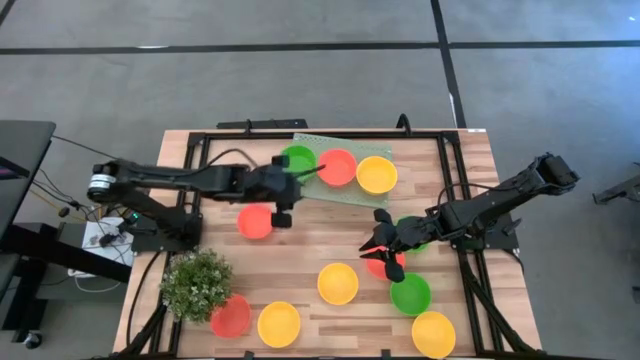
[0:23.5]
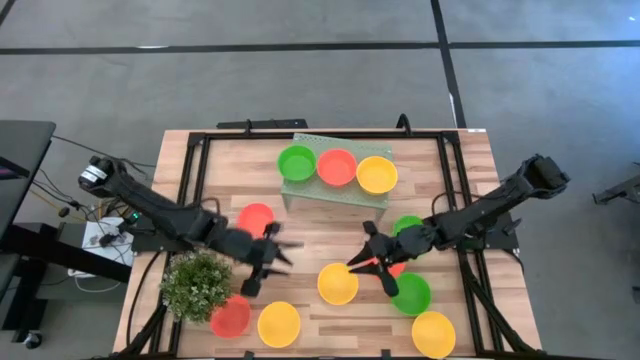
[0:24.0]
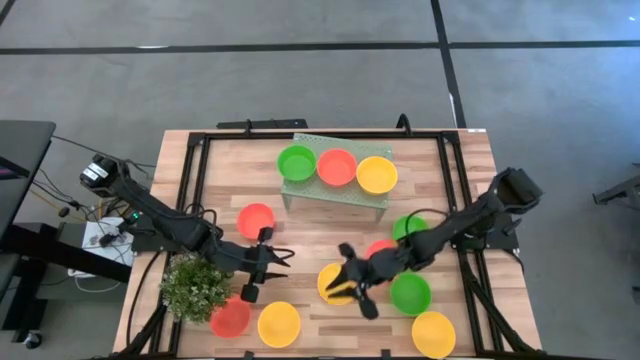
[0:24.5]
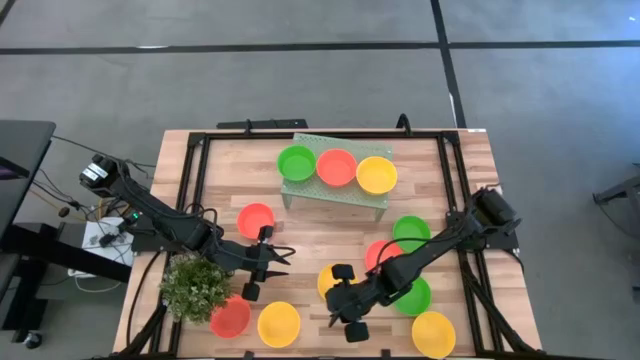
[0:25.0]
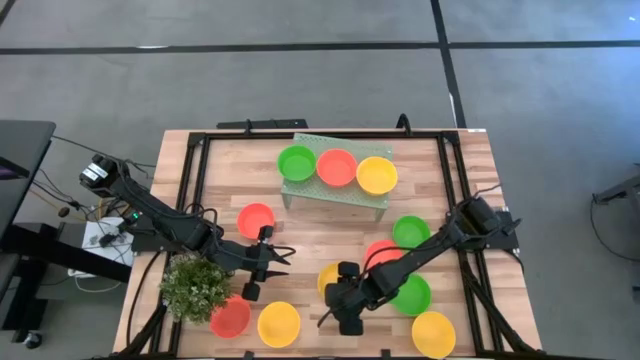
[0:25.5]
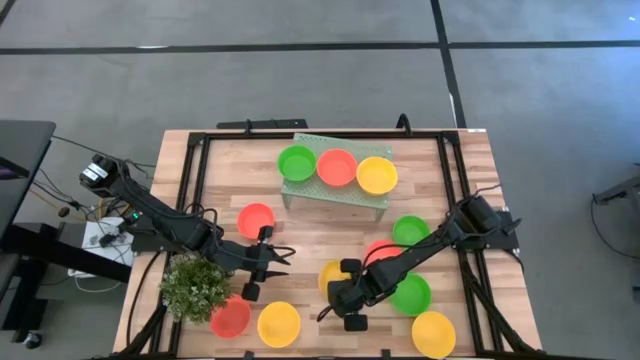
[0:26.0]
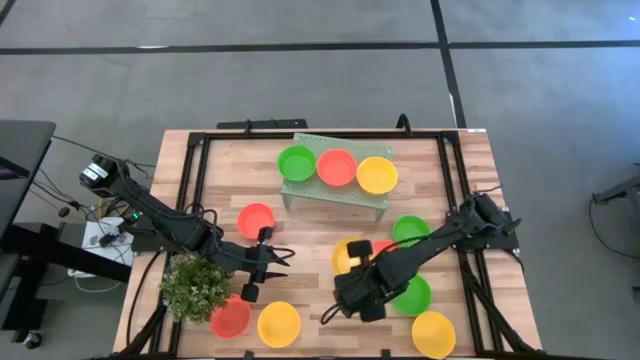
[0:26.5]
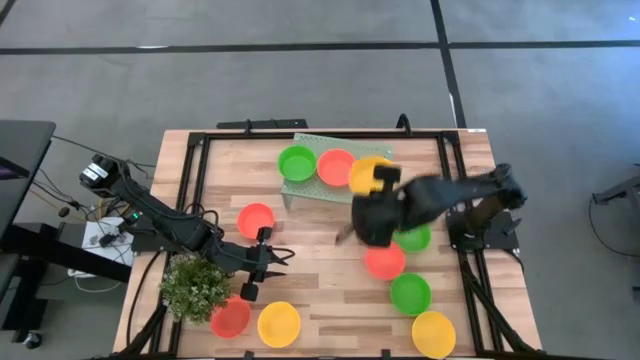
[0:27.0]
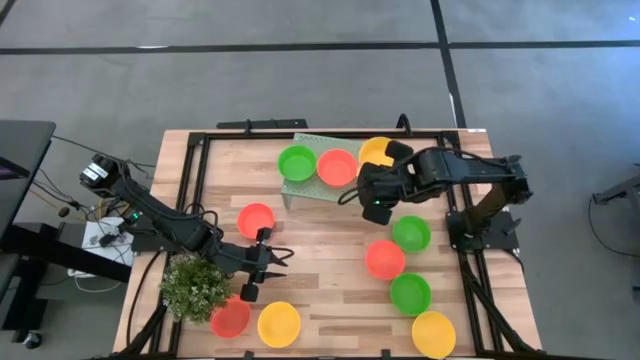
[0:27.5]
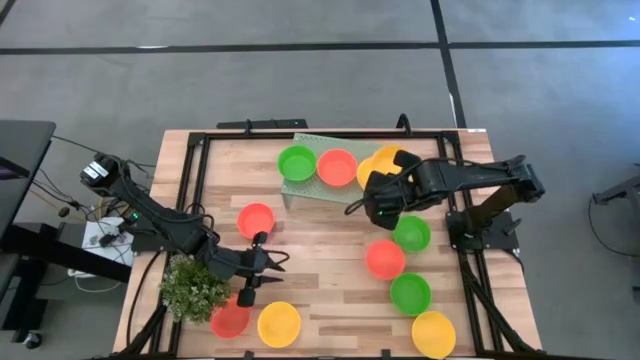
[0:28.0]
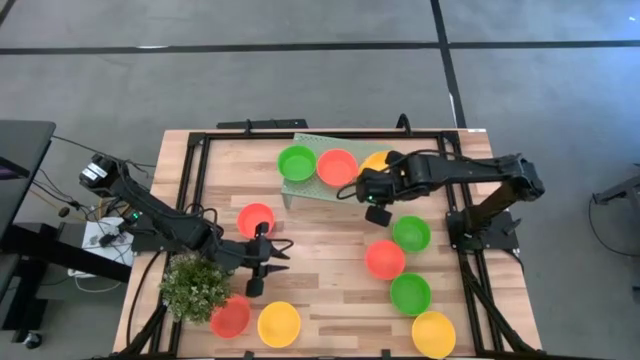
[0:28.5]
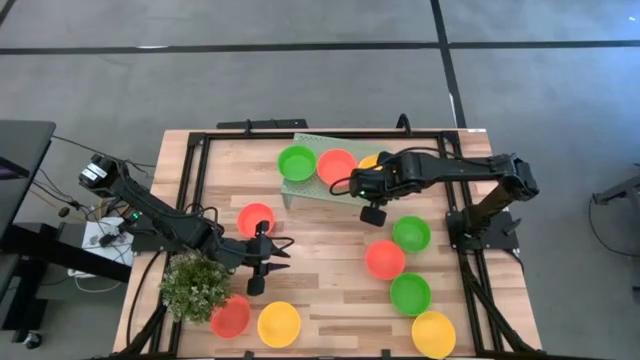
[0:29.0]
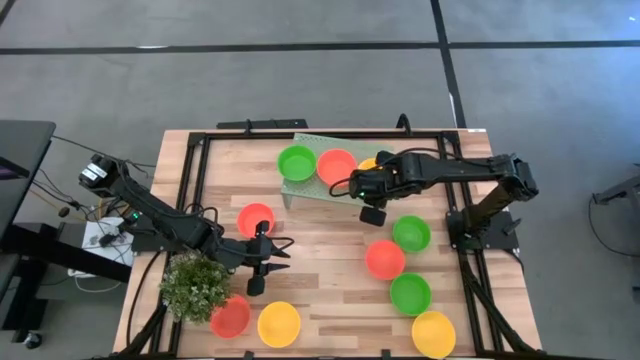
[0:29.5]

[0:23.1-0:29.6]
Task: Pick & Place Mini bowls
Stack the yellow bowl on top of the yellow bowl on the shelf

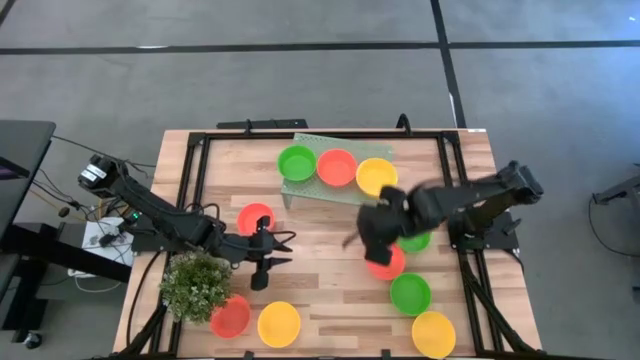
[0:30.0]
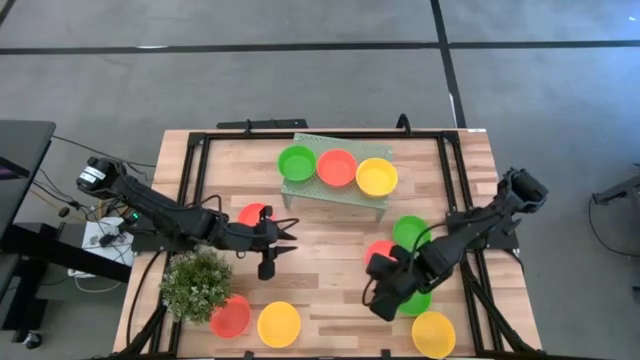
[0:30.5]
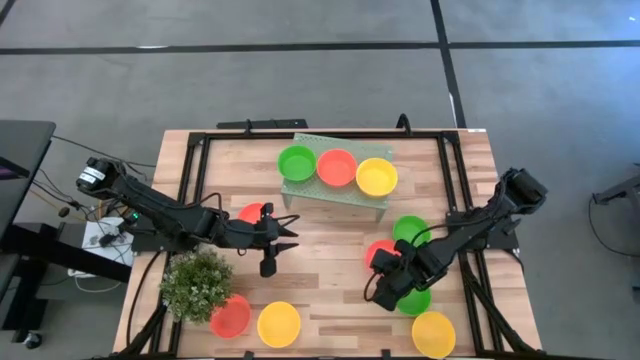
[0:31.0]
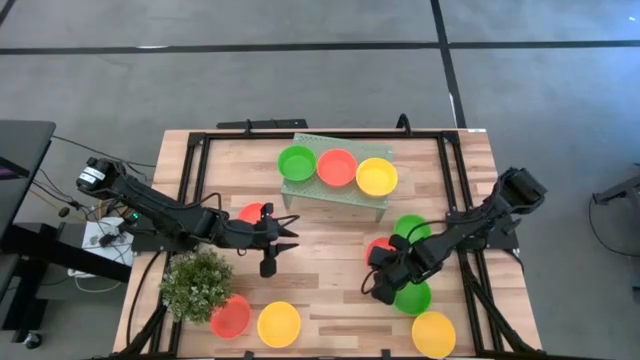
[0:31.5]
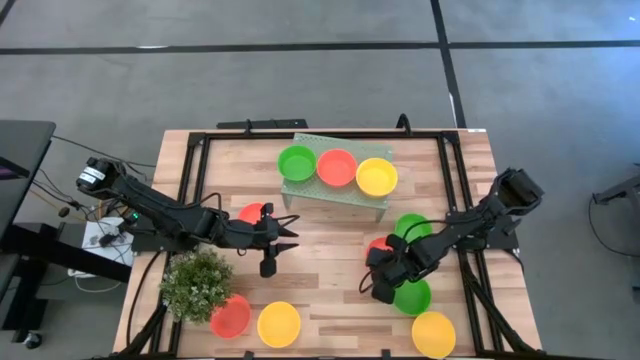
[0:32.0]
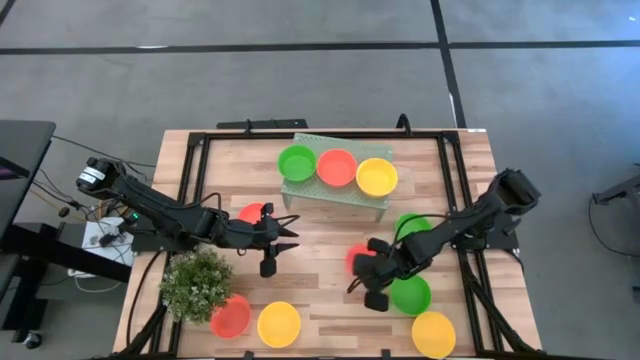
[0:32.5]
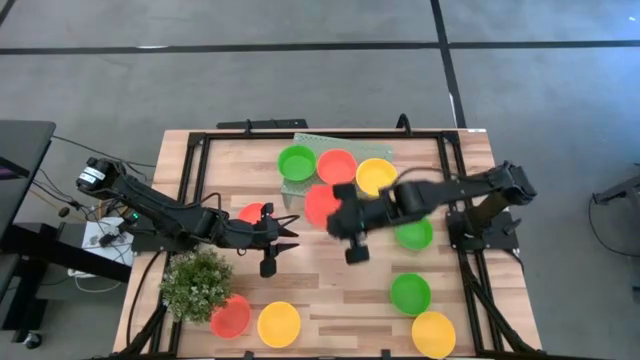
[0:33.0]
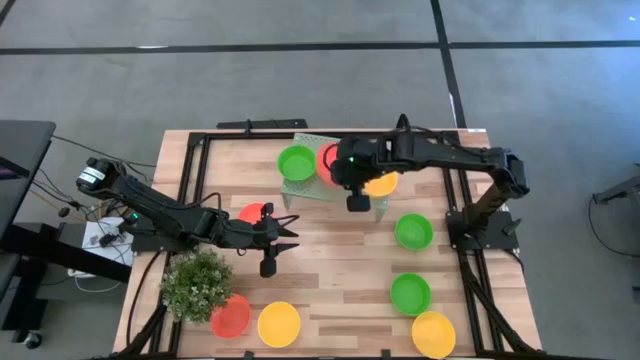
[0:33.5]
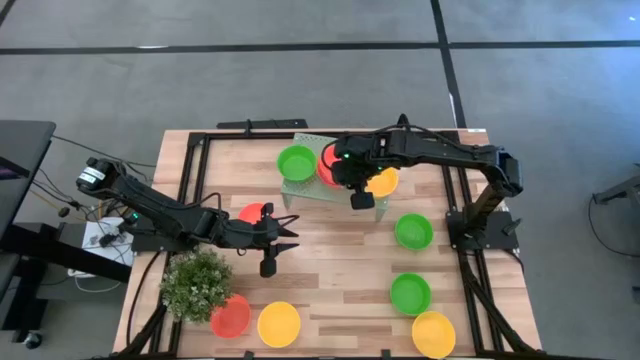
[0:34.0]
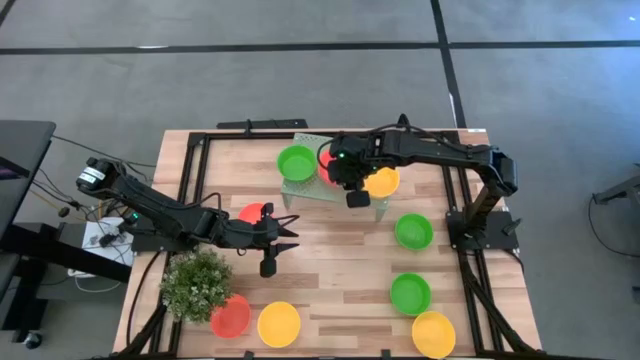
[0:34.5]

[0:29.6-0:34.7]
Stack the orange bowl on top of the orange bowl on the shelf

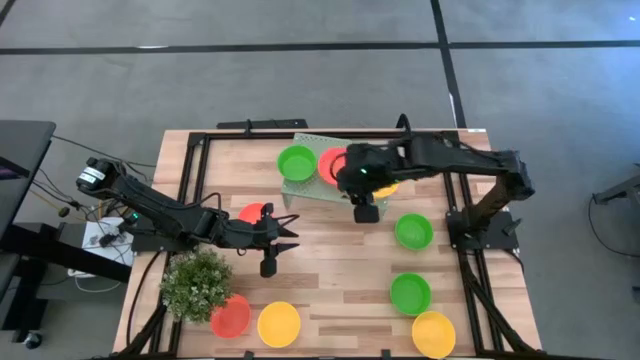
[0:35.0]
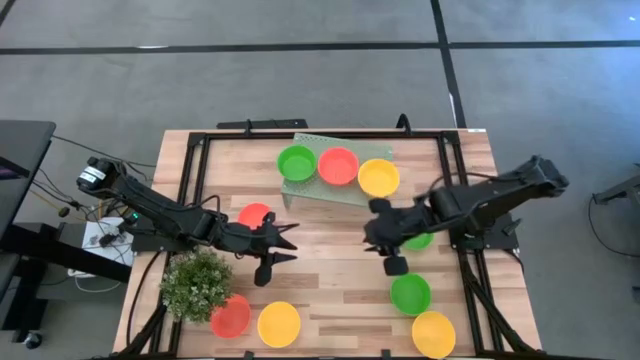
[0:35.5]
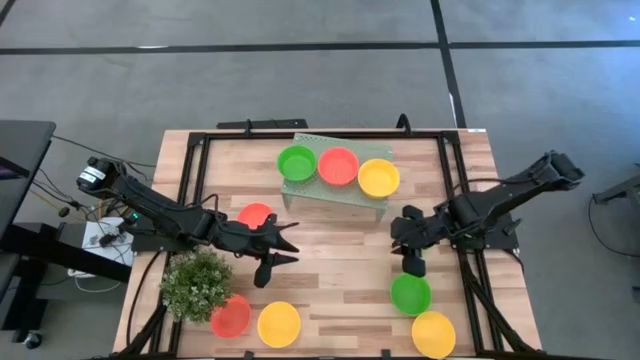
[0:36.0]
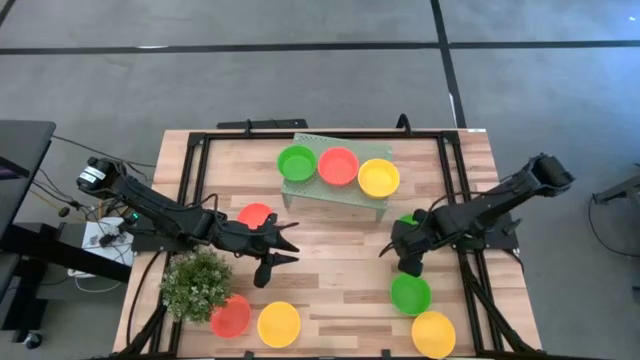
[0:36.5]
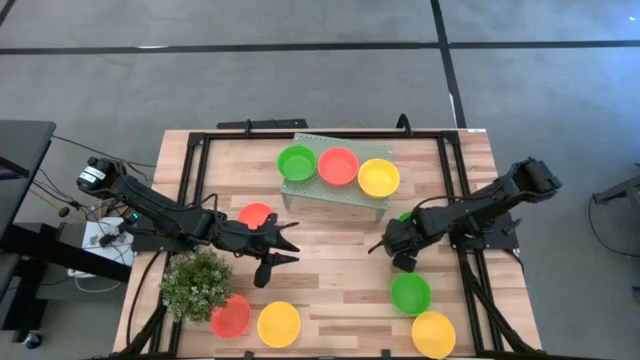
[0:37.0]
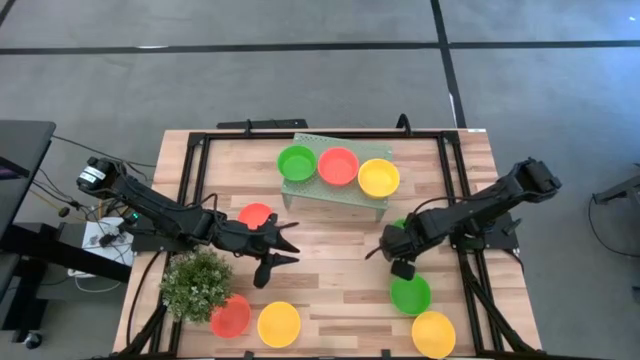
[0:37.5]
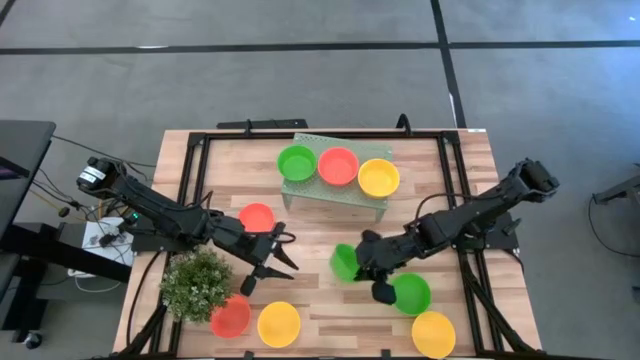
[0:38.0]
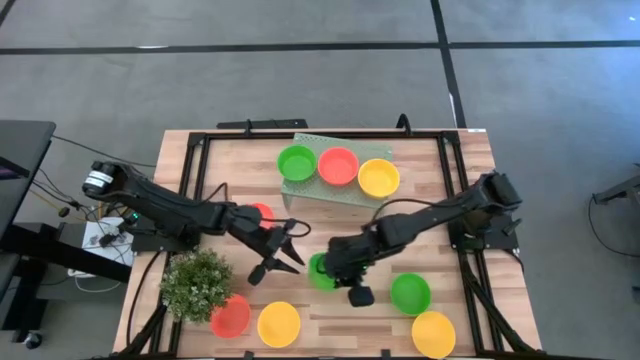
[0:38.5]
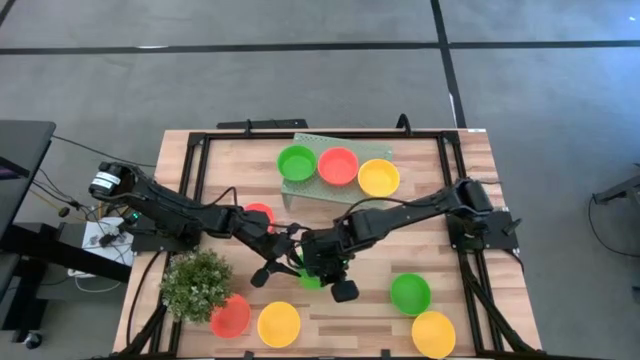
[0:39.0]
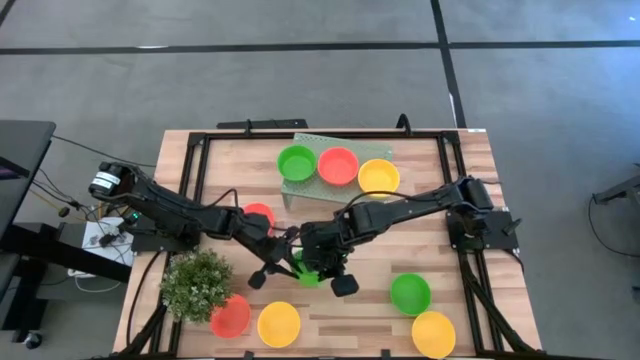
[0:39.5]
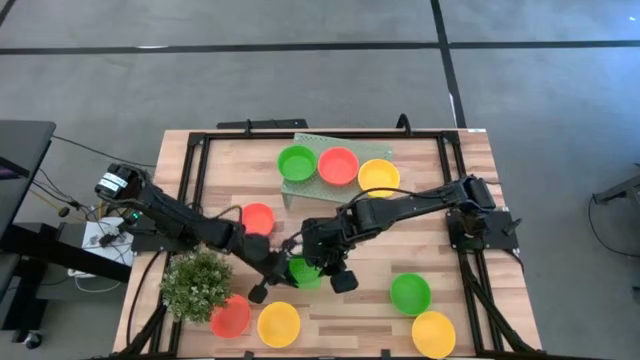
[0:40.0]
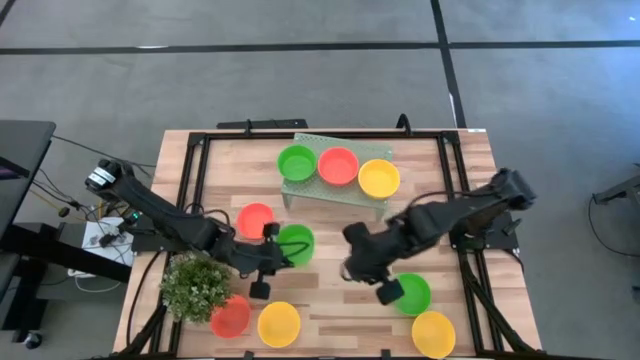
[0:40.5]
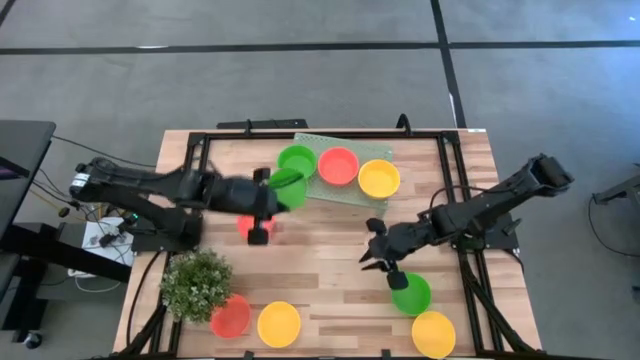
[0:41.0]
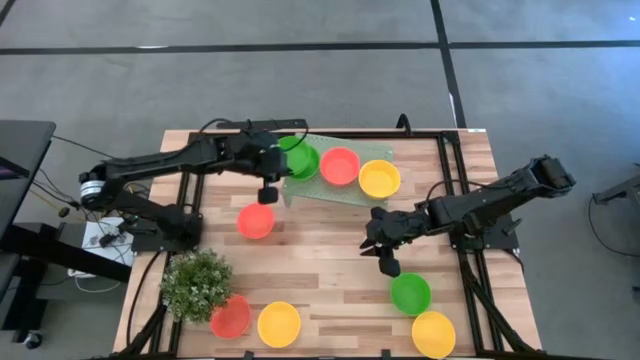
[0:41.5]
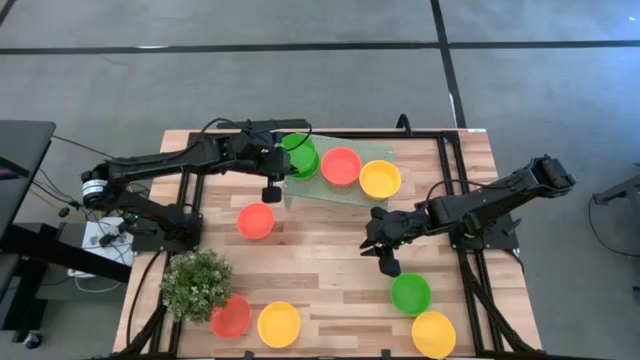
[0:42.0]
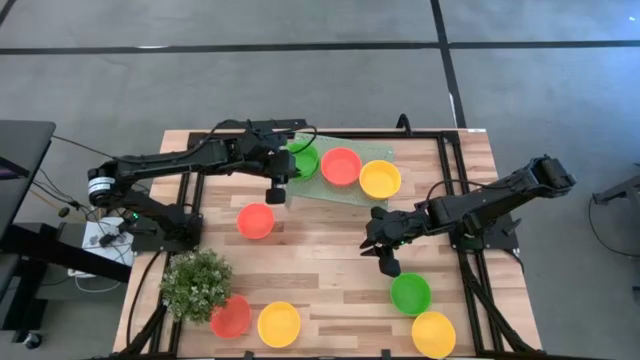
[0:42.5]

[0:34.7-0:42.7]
Stack the green bowl on top of the green bowl on the shelf

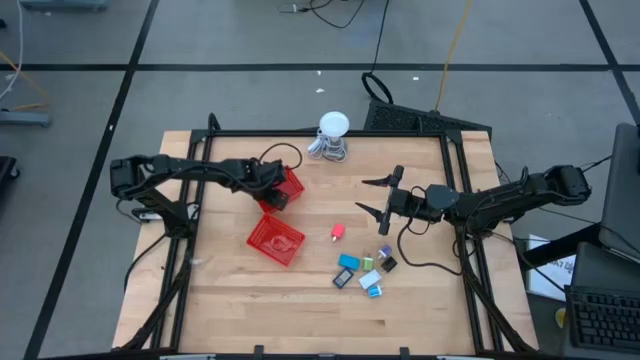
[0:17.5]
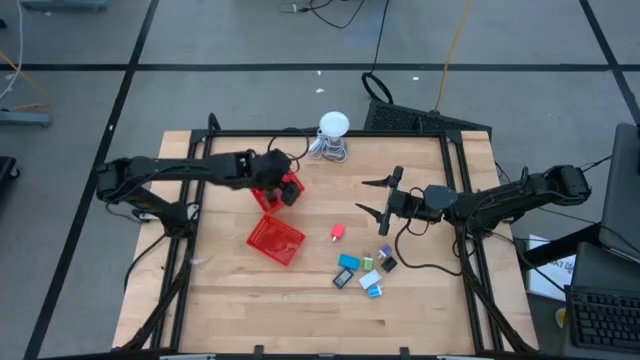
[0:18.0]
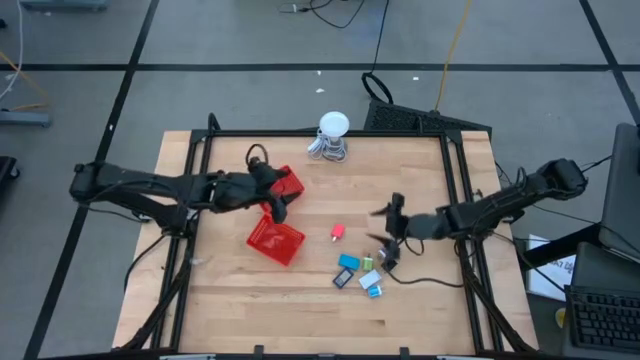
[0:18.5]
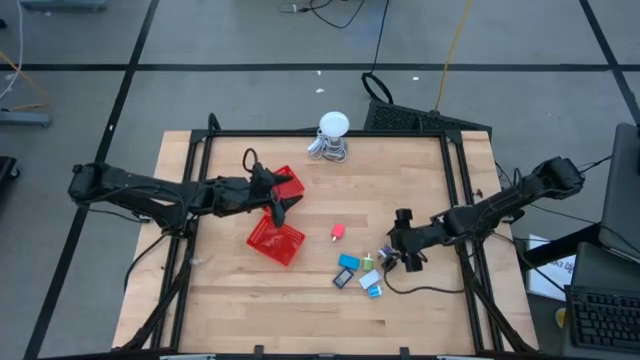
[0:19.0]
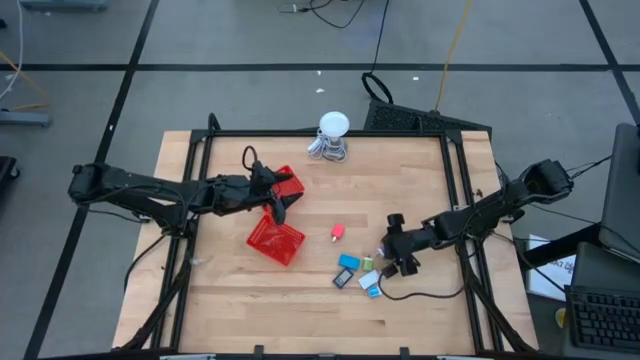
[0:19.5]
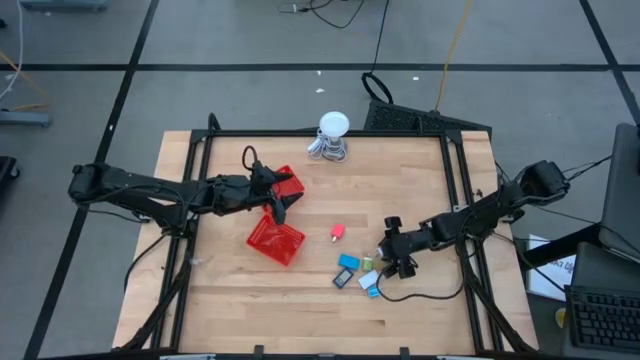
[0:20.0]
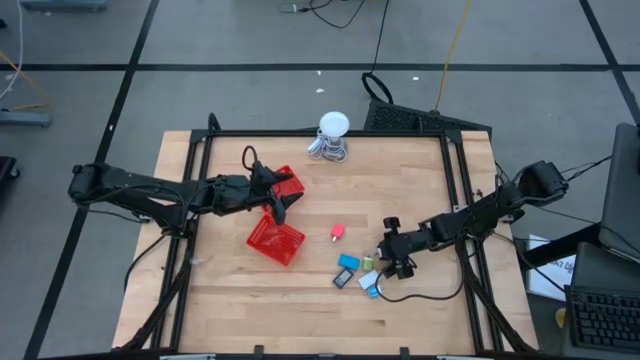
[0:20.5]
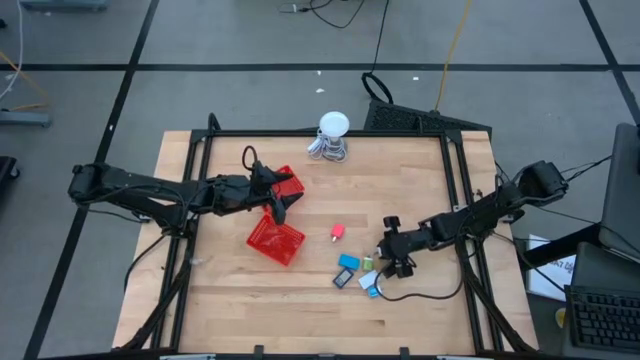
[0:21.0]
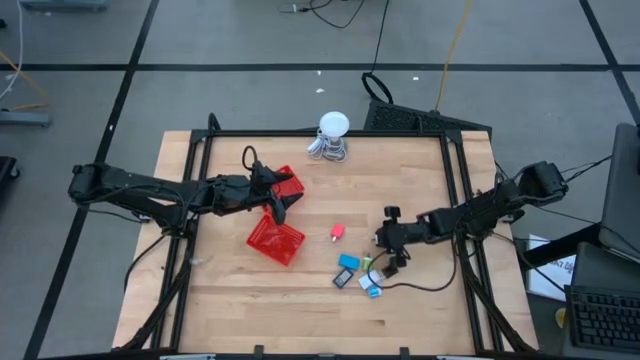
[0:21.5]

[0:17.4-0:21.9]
Task: Pick & Place Office items
Put the dark blue charger adapter into the top red basket
